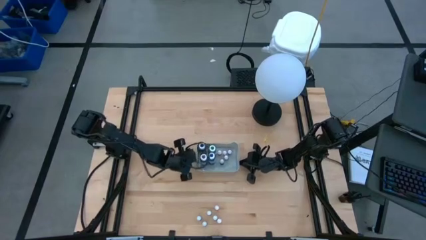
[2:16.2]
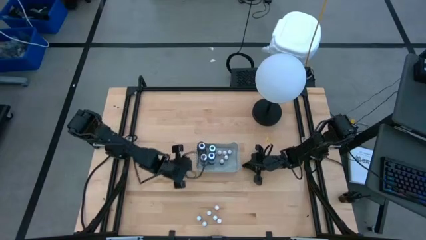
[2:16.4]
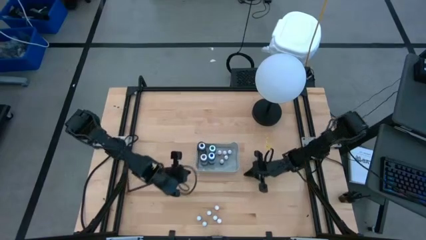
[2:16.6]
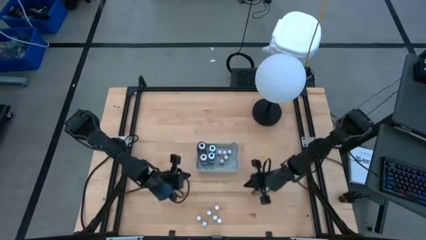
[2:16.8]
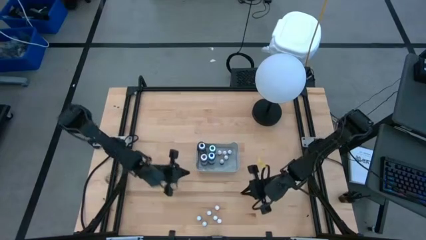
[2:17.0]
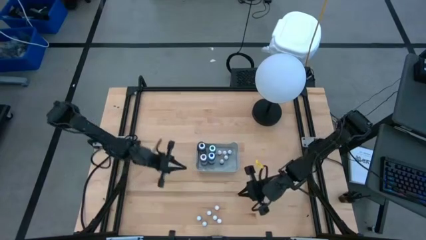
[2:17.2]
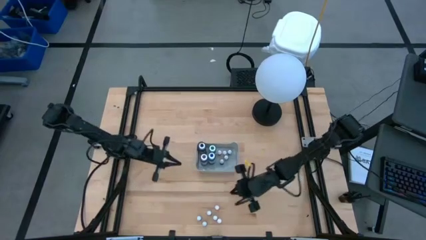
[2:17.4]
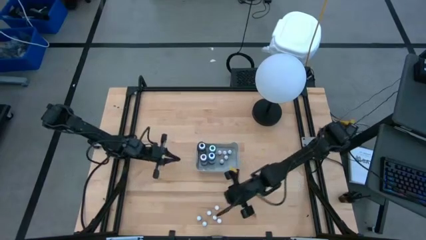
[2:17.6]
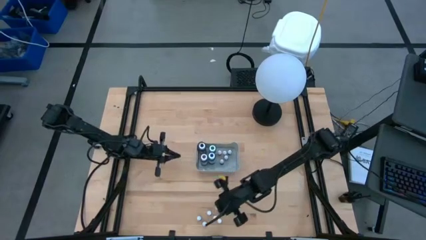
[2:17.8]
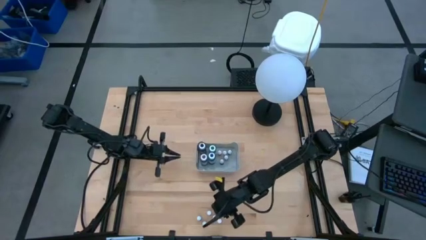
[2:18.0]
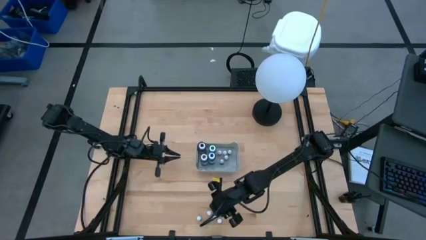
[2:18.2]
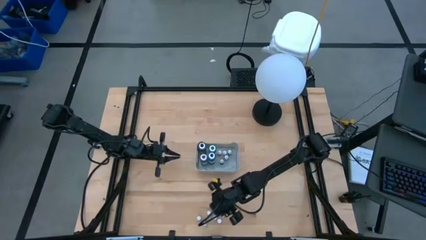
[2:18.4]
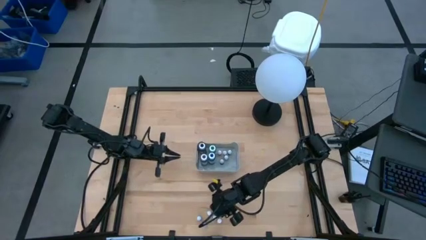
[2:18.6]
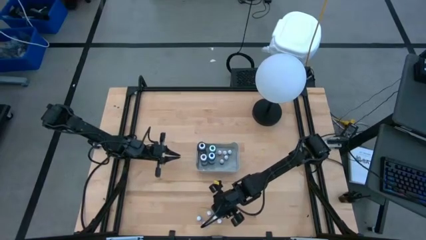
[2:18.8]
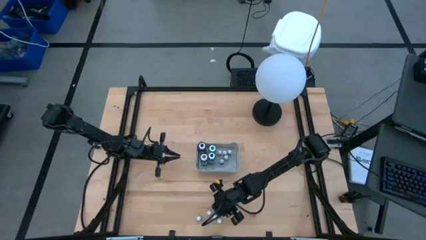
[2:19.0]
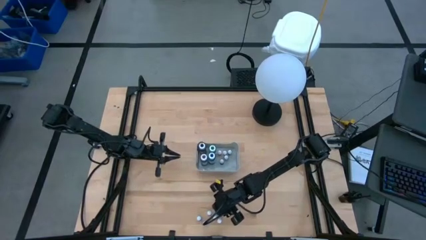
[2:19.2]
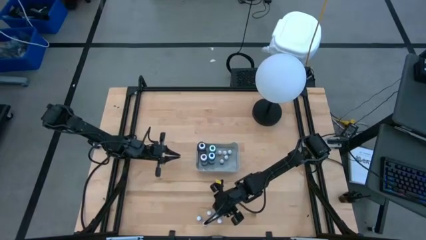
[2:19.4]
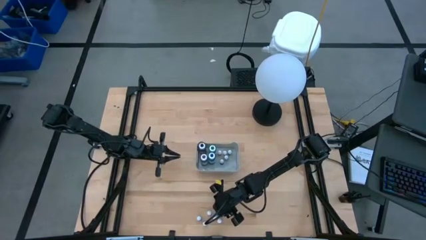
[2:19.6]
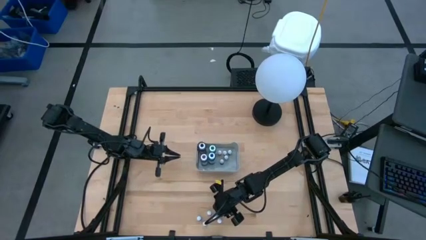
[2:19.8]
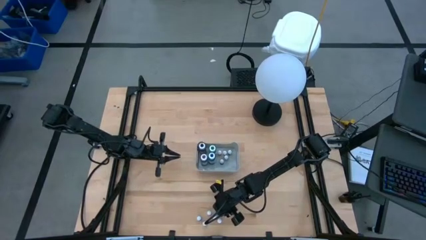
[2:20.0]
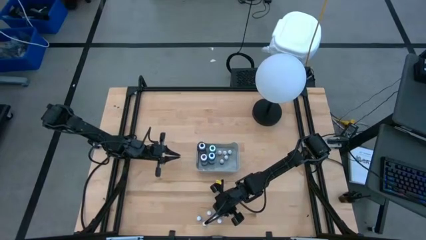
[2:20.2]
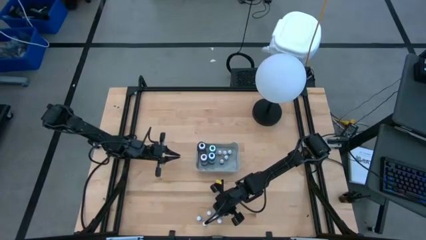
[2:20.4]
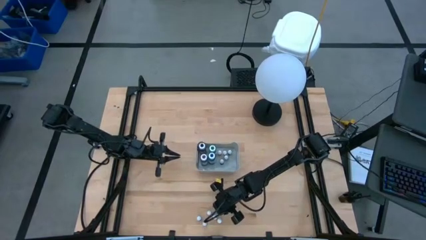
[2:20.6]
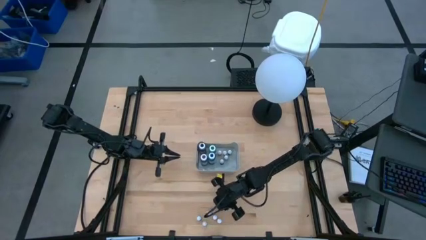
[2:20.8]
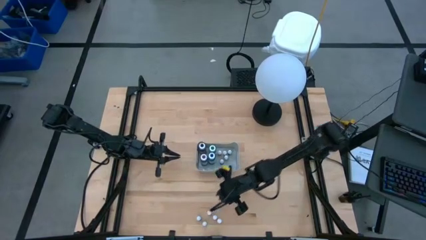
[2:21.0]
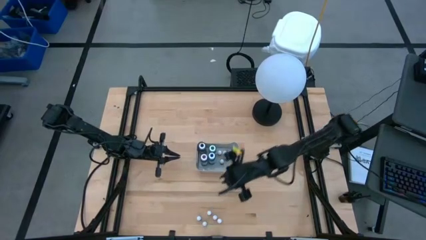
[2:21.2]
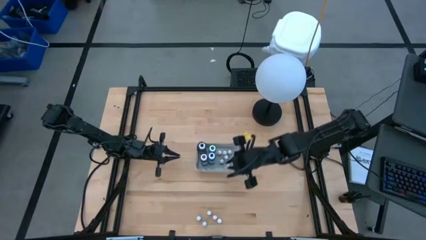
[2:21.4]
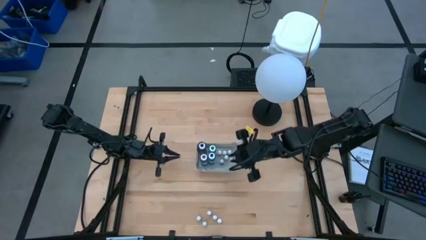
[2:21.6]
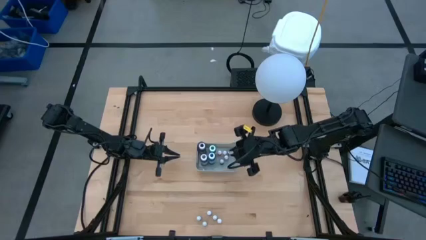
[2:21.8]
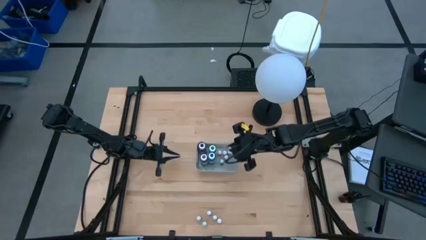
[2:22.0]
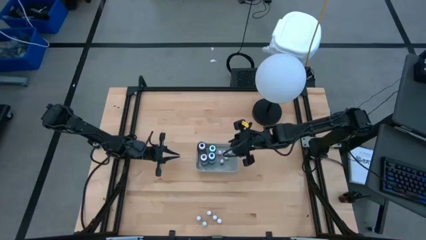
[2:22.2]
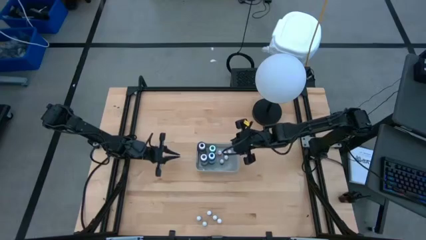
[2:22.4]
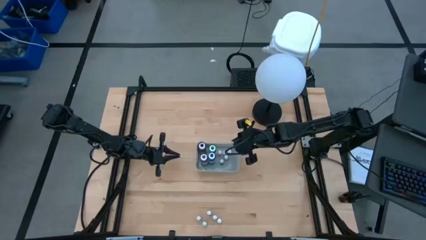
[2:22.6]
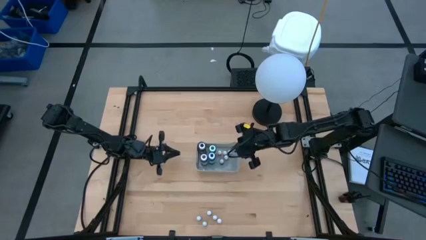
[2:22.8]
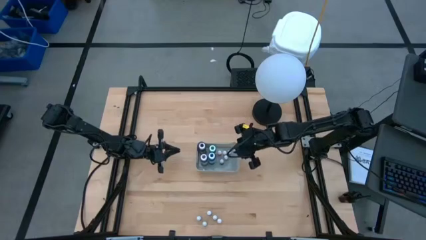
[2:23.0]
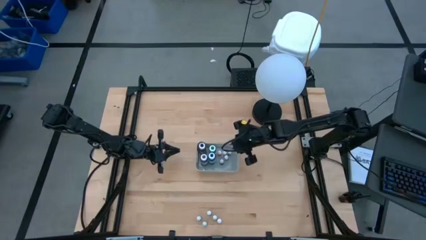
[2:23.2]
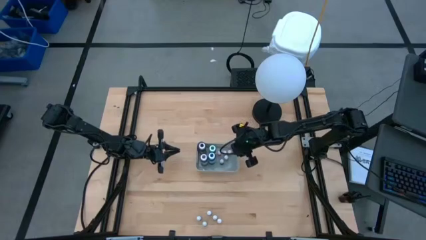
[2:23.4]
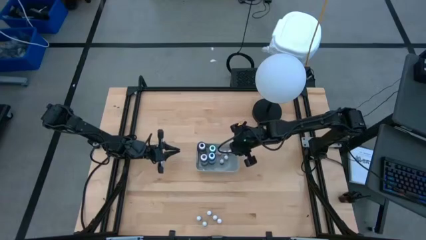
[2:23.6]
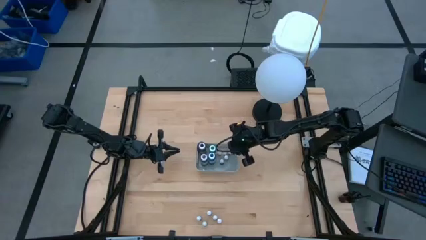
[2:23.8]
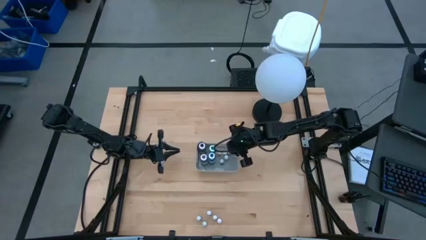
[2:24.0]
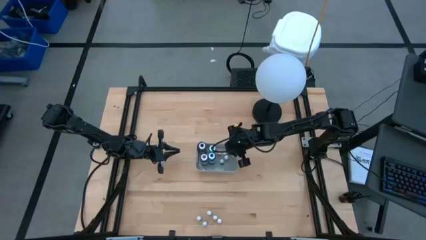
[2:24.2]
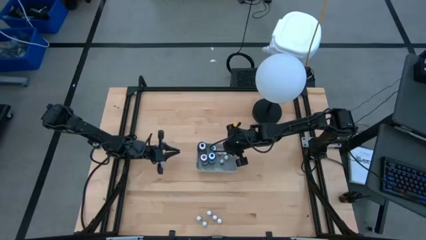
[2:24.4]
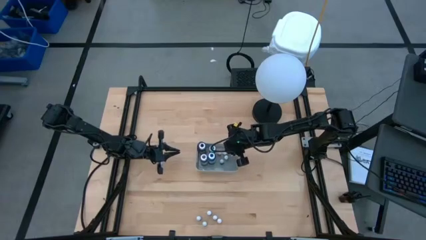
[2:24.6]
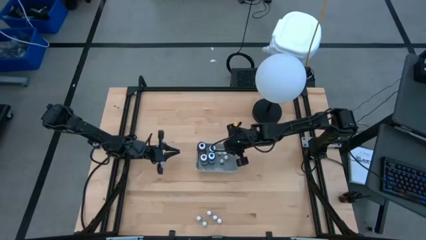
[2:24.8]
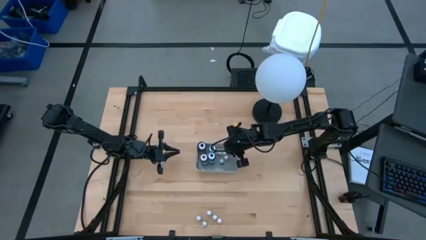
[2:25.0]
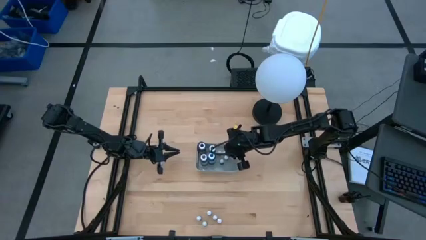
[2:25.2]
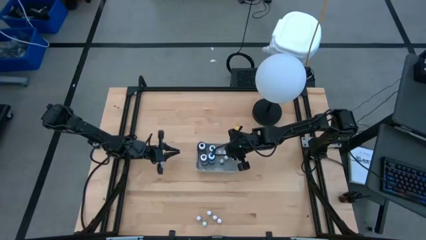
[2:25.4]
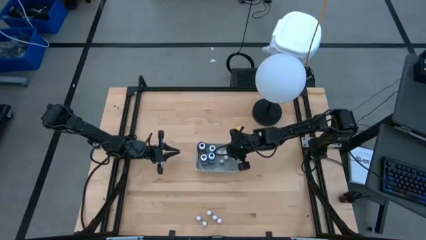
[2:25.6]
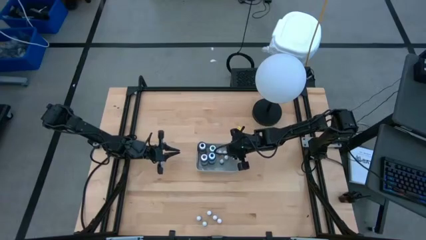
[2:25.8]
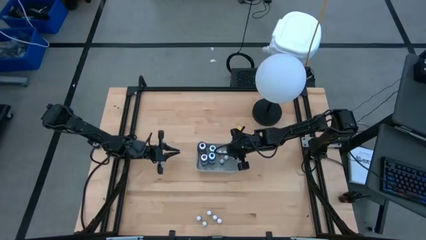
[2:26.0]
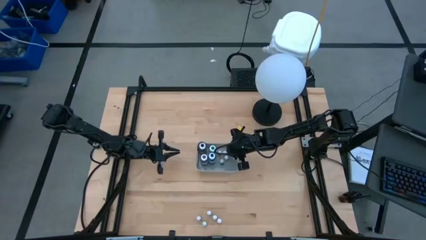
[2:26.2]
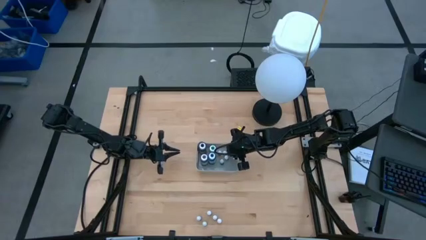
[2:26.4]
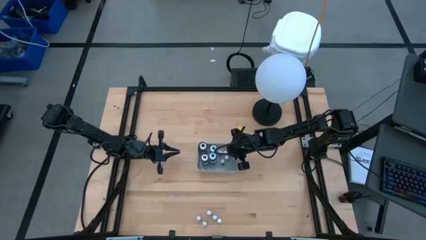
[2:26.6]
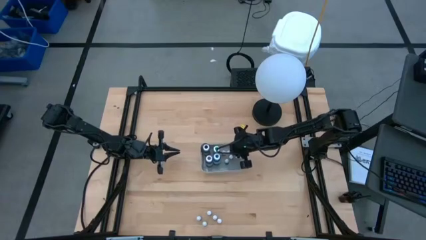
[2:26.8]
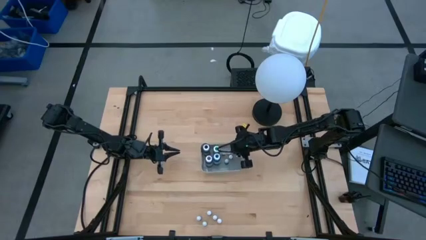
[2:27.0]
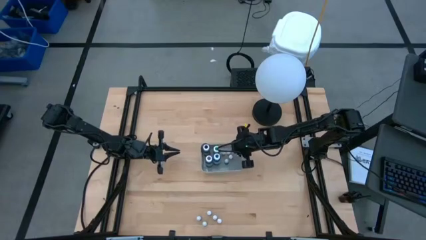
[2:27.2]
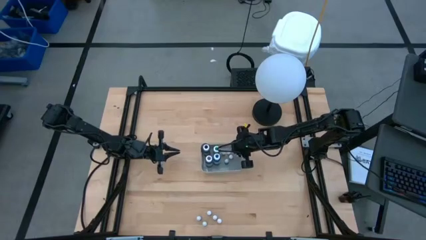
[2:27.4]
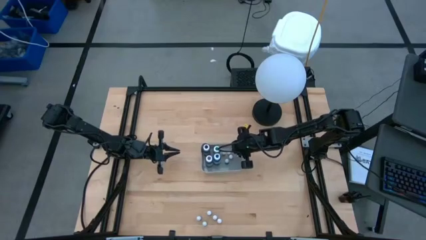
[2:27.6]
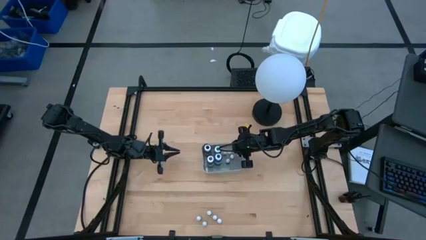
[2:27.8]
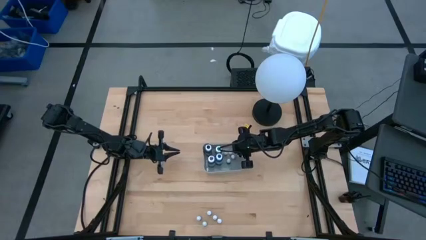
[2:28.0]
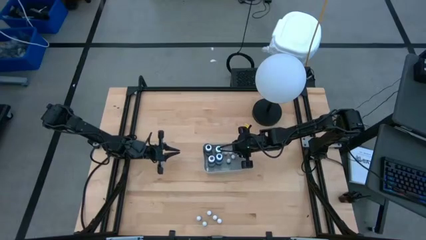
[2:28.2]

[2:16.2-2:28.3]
Task: Pick & Place food coloring
Put the small orange food coloring bottle into the gray bin

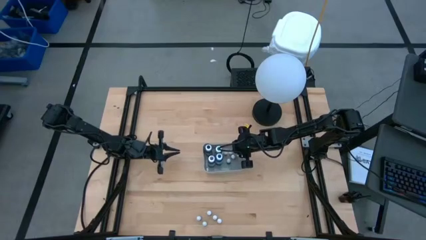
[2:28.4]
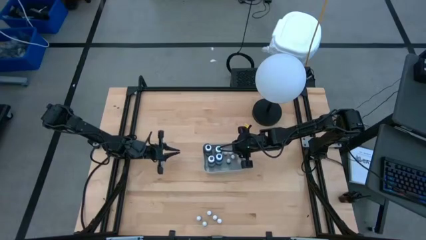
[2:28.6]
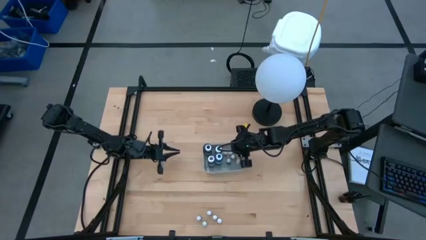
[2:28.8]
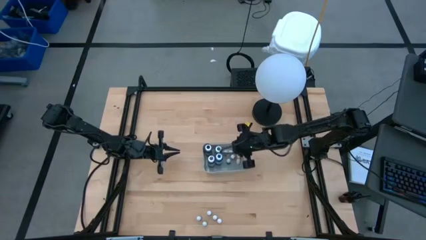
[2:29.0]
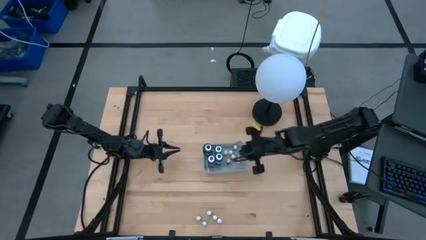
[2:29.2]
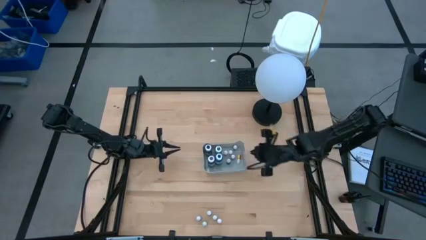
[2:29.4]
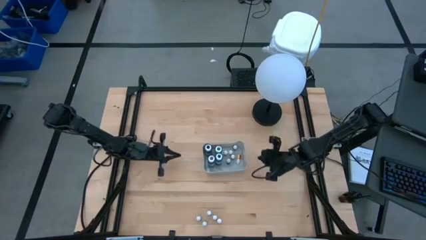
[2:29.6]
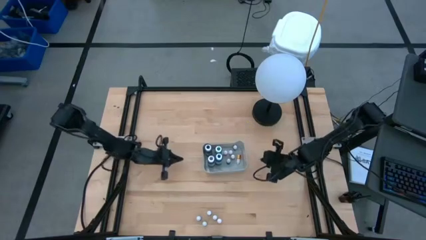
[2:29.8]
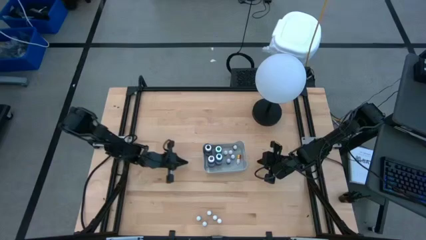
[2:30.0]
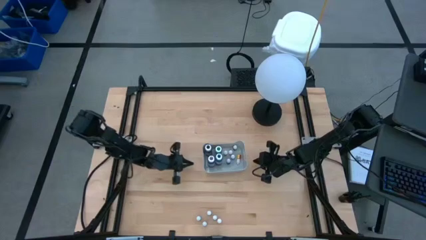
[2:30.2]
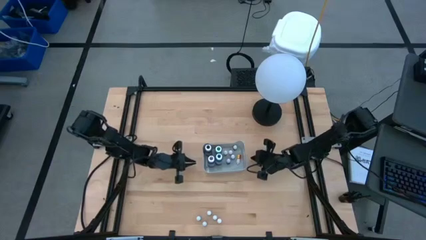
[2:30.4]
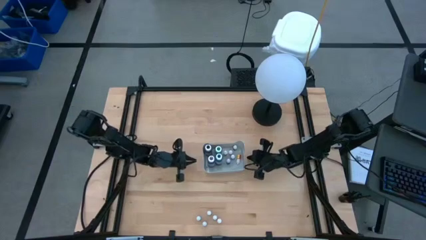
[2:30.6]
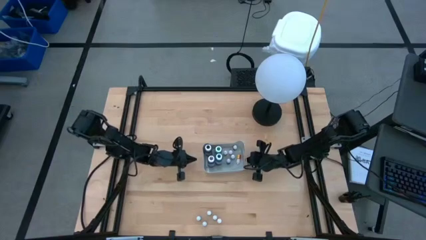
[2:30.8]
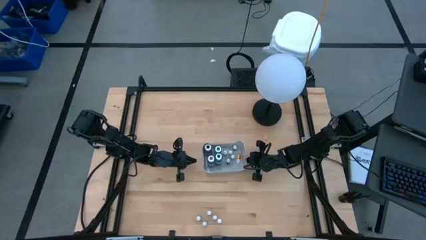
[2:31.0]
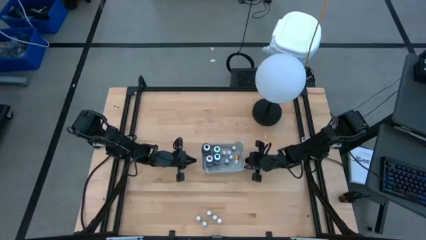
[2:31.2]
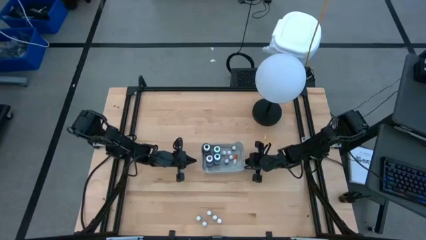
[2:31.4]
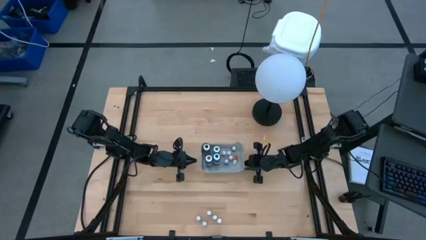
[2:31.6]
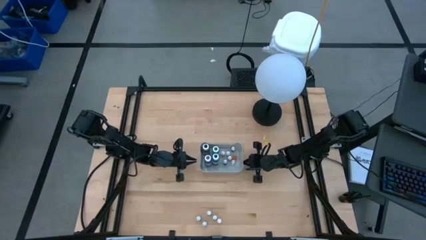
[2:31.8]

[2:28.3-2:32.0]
Adjust the gray bin to the center of the table
